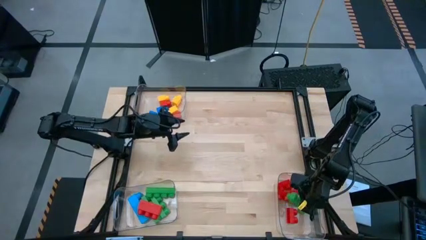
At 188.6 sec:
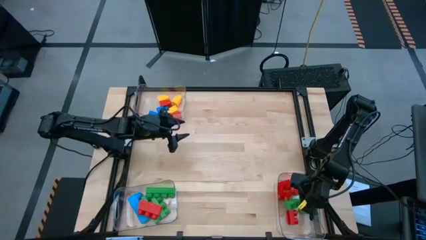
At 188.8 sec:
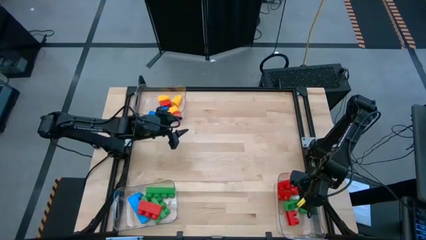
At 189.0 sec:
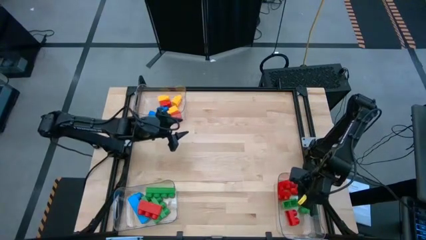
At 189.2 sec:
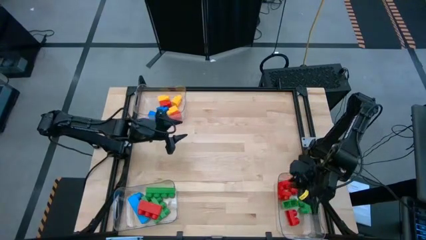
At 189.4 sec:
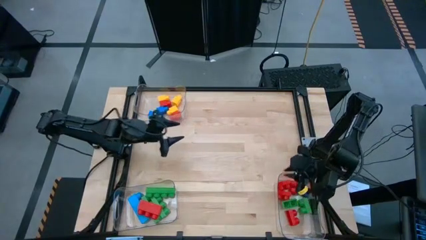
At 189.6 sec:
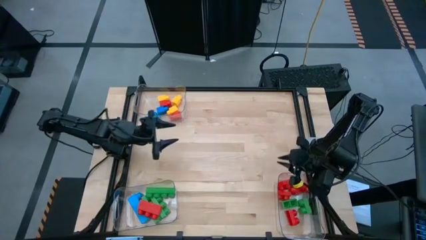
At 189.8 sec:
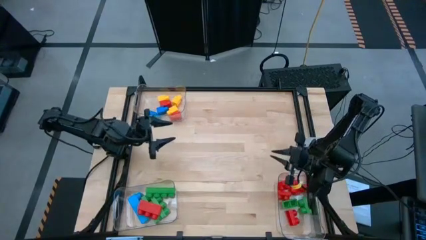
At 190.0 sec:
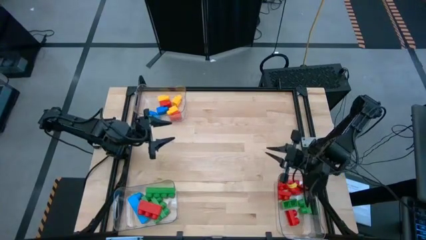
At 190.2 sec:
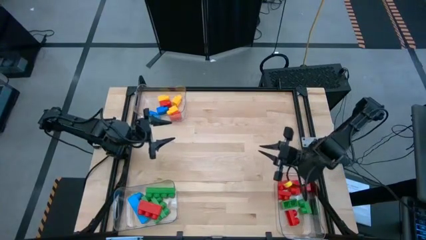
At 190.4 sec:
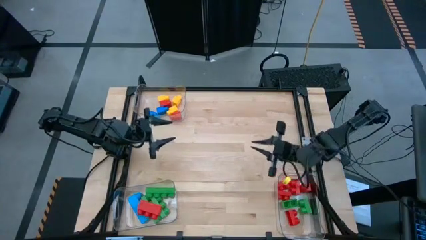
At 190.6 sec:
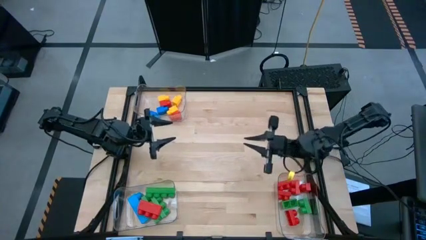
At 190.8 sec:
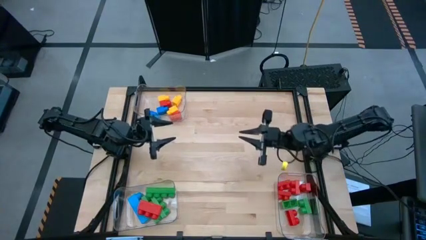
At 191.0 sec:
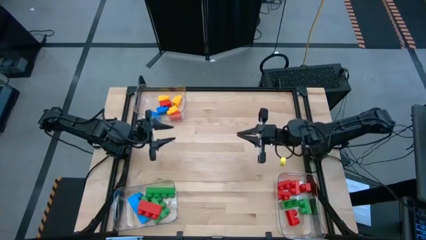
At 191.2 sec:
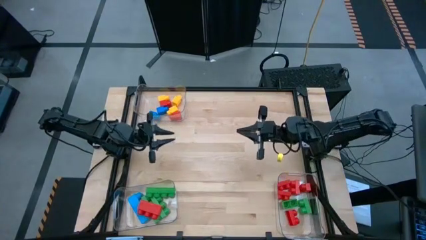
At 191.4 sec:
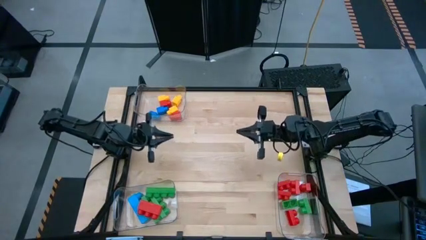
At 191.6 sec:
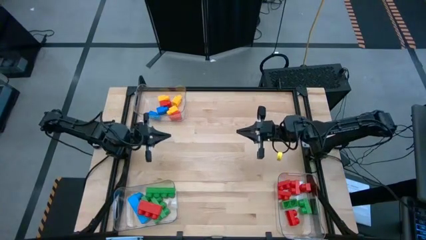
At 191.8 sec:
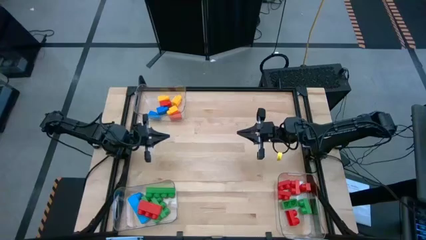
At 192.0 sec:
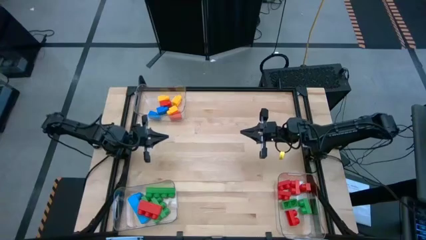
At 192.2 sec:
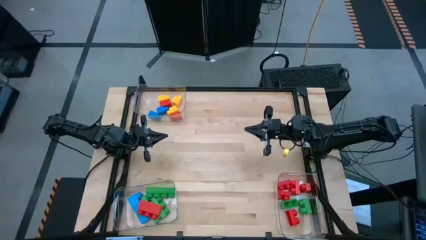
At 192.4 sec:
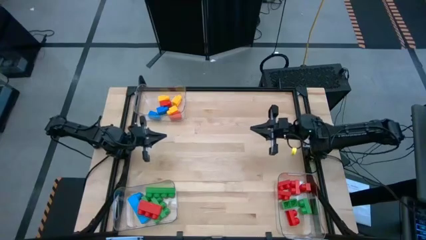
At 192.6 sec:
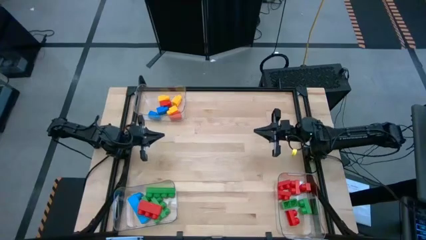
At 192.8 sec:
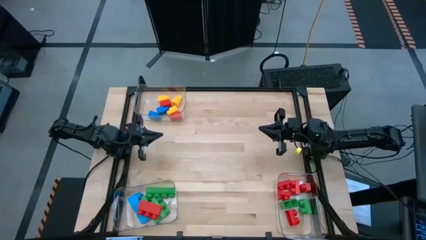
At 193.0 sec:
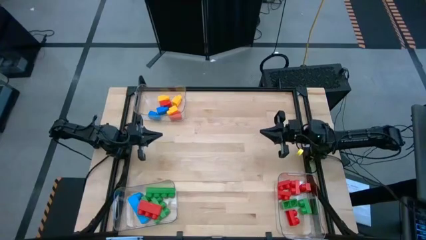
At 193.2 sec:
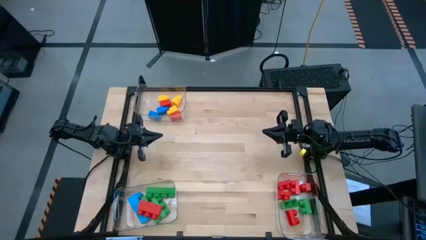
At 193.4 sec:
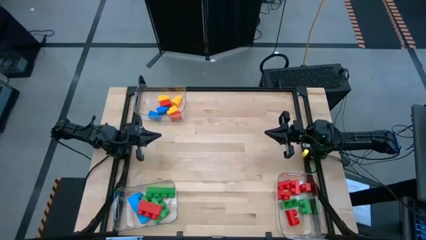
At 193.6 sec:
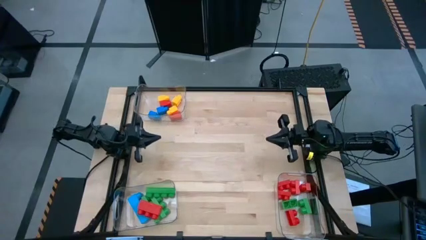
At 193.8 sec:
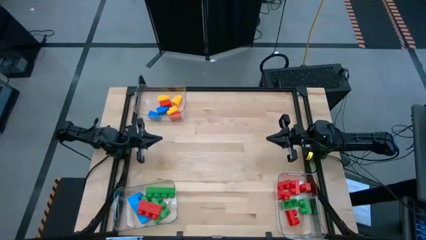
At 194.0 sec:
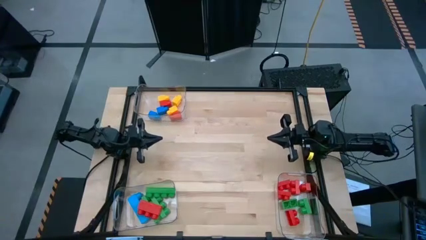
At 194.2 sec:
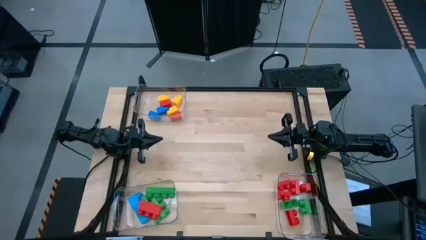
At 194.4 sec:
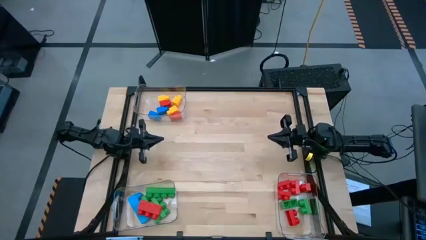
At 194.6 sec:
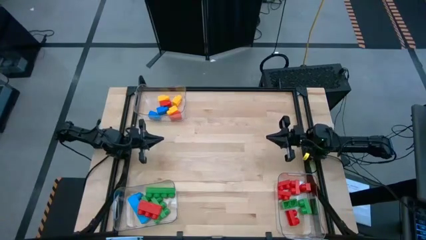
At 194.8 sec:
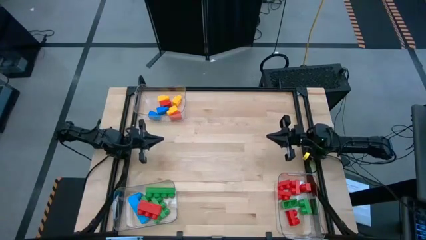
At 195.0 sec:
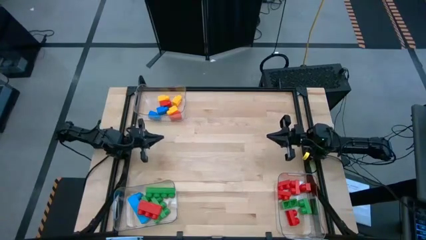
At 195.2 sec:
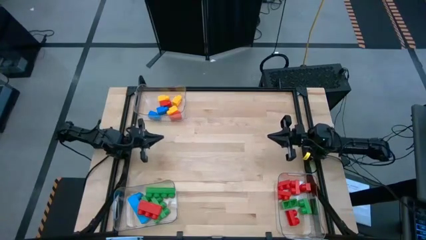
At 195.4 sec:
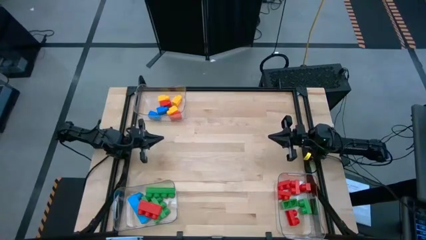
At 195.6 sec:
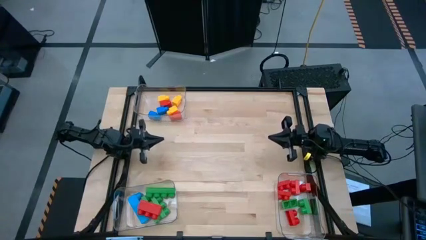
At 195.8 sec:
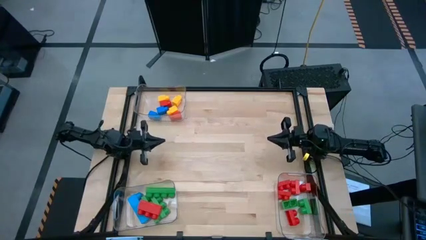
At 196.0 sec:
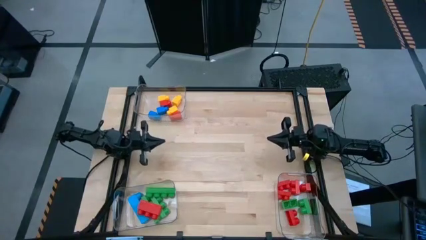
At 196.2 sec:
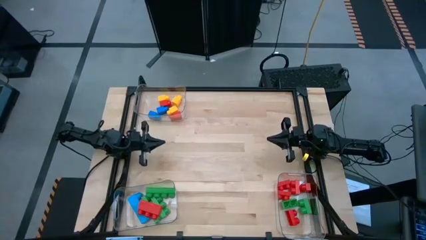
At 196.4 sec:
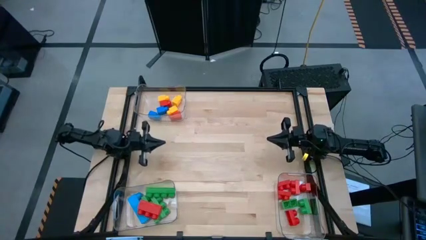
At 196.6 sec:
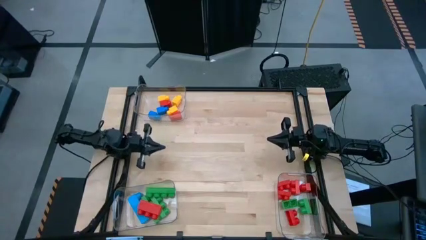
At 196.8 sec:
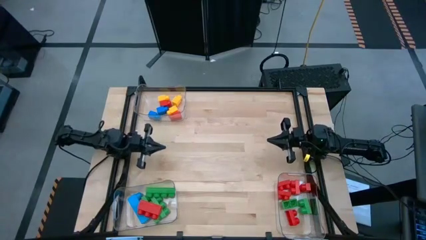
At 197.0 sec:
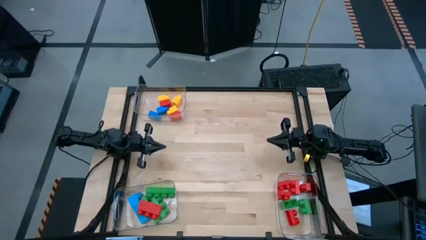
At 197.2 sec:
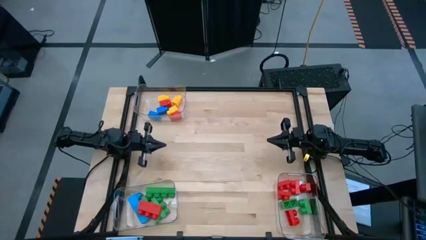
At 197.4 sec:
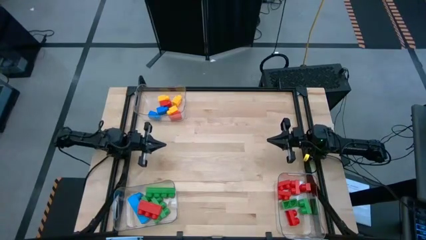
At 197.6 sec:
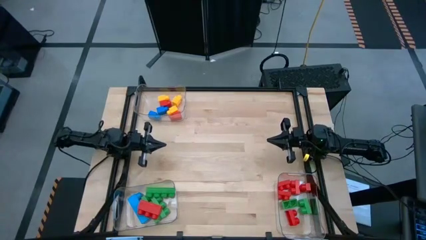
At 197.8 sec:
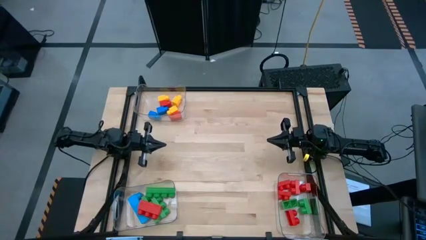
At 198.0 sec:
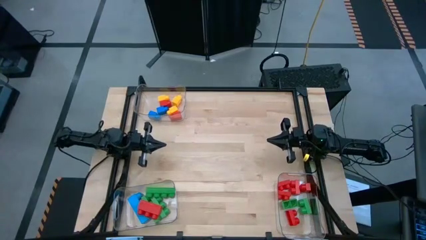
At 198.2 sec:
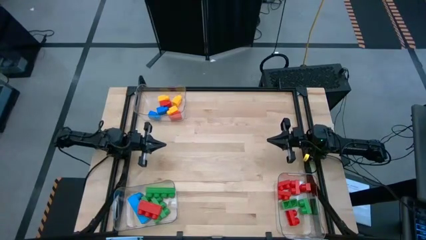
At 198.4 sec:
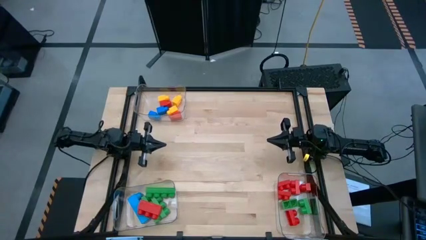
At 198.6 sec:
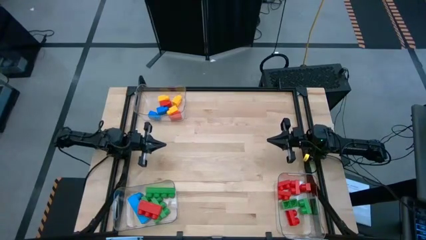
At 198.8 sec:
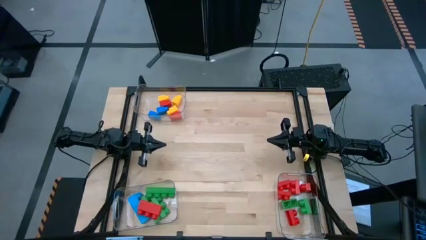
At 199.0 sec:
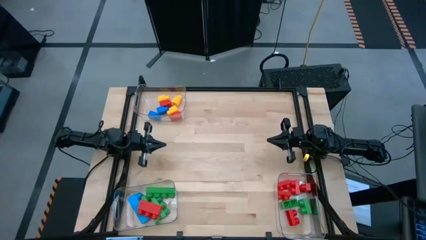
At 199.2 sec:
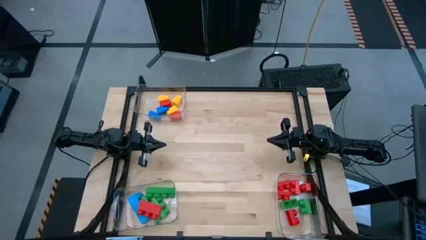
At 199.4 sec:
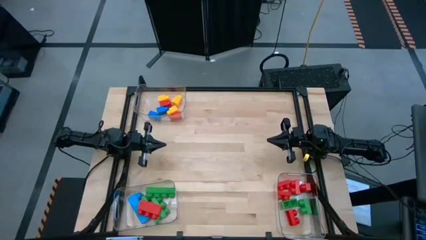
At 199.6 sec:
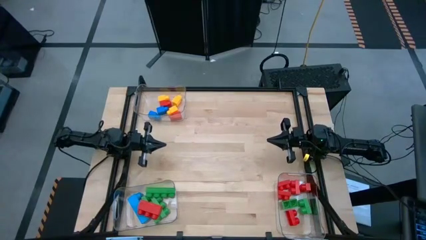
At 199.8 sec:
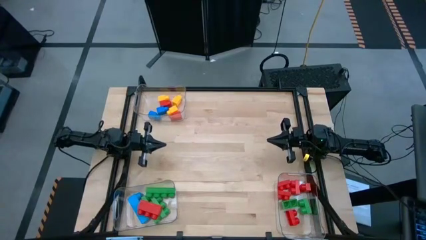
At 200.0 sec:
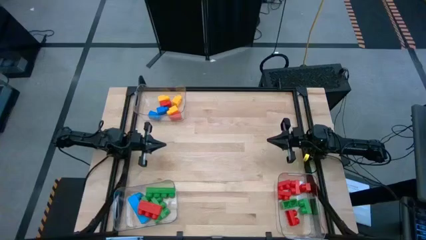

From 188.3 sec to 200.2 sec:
Task: Sort blocks by size
Return to Home Position

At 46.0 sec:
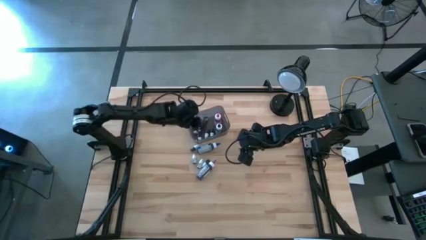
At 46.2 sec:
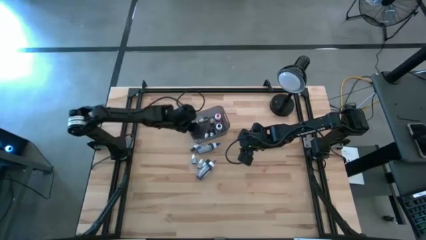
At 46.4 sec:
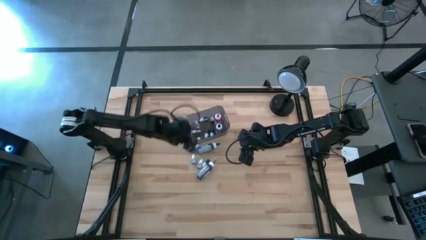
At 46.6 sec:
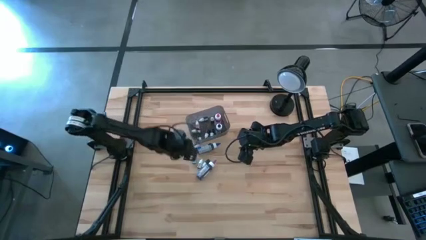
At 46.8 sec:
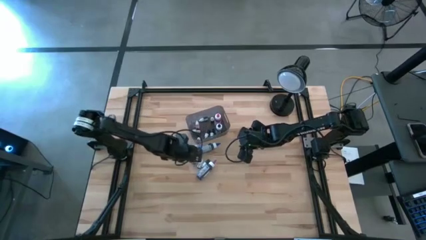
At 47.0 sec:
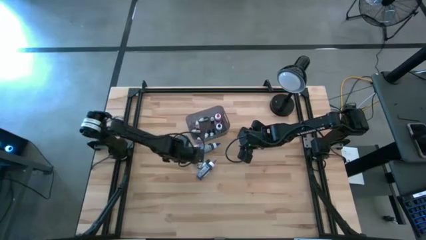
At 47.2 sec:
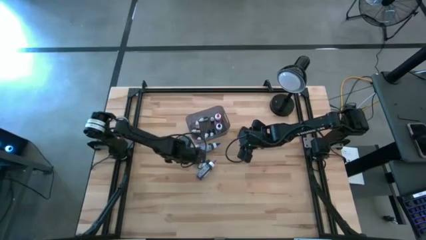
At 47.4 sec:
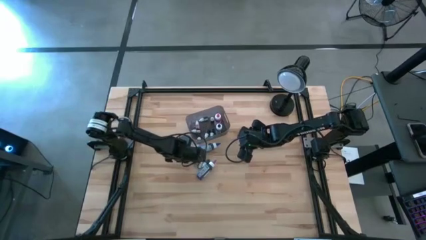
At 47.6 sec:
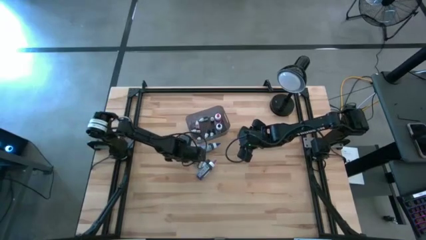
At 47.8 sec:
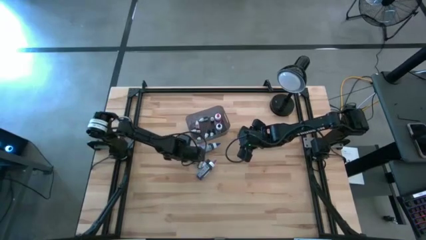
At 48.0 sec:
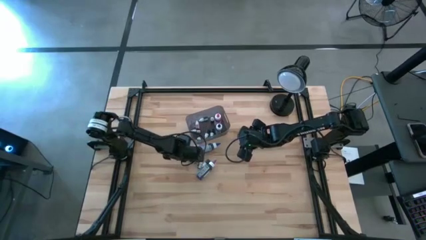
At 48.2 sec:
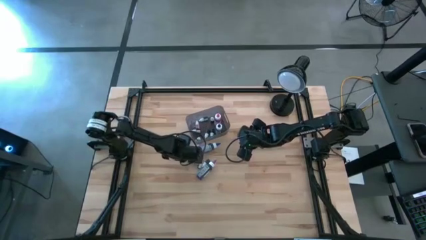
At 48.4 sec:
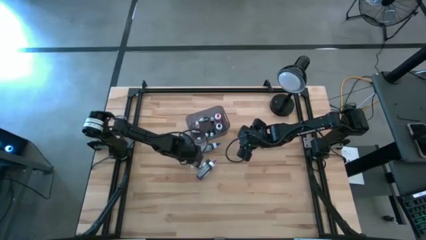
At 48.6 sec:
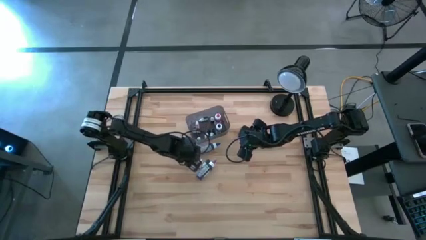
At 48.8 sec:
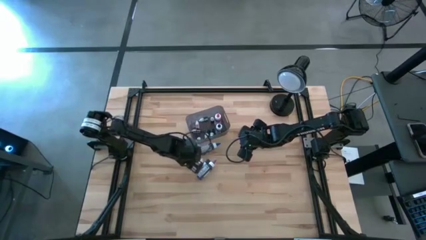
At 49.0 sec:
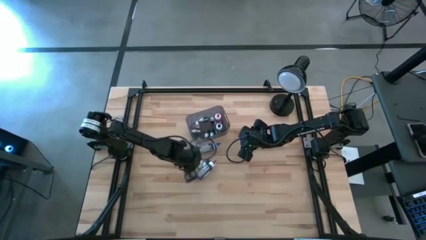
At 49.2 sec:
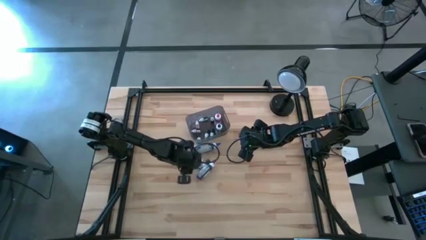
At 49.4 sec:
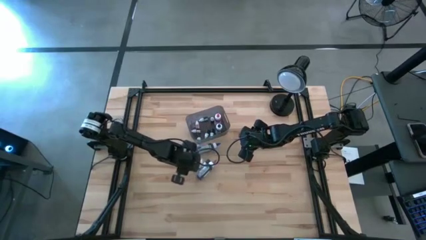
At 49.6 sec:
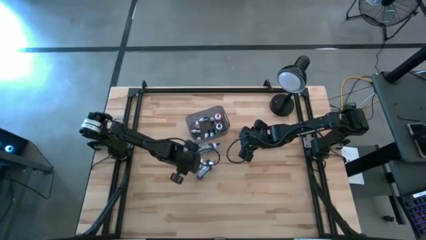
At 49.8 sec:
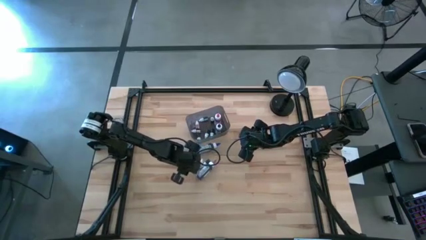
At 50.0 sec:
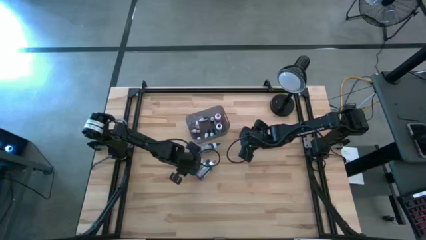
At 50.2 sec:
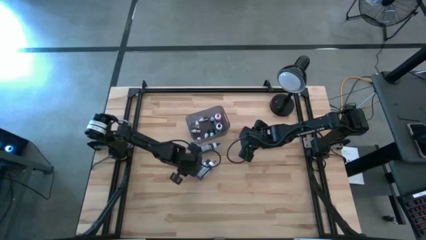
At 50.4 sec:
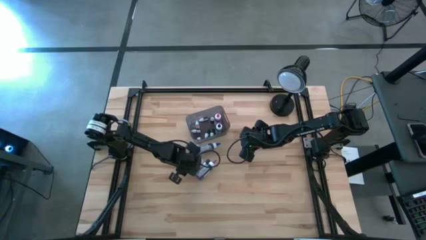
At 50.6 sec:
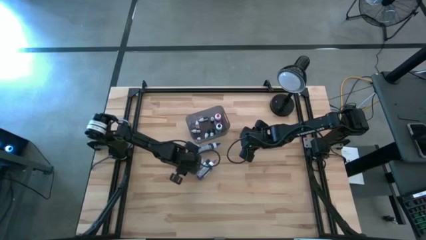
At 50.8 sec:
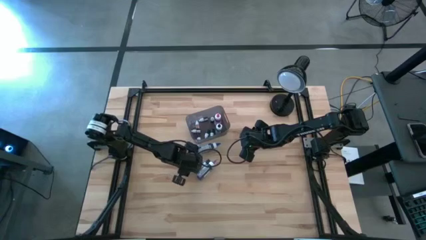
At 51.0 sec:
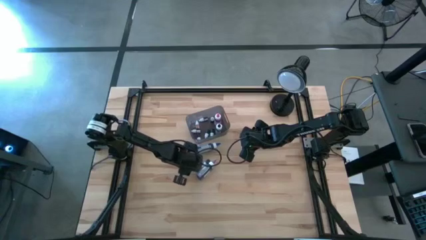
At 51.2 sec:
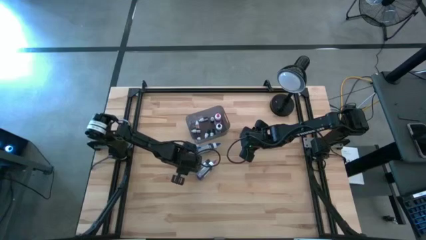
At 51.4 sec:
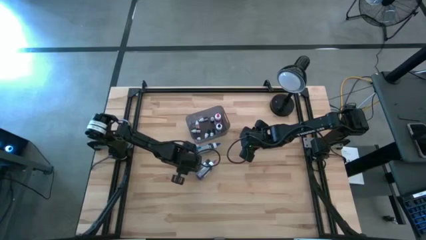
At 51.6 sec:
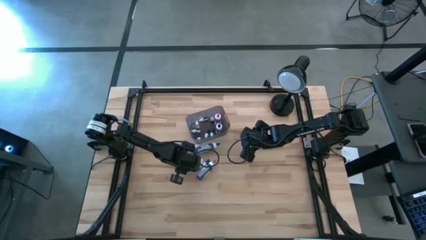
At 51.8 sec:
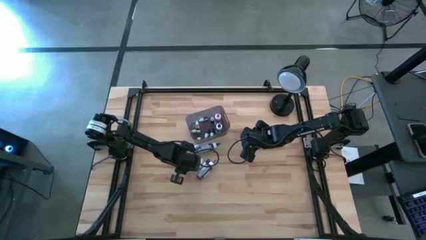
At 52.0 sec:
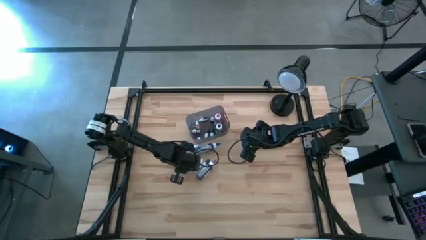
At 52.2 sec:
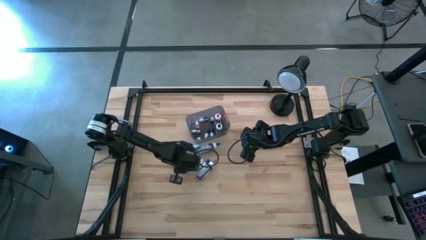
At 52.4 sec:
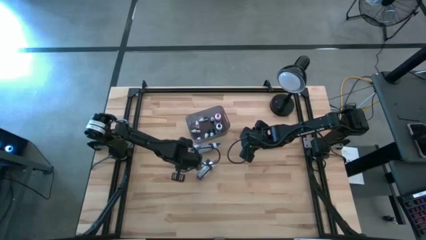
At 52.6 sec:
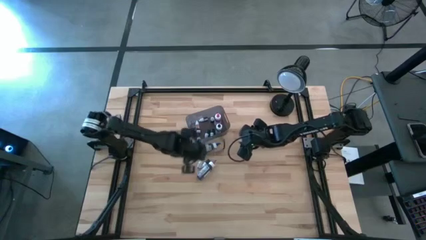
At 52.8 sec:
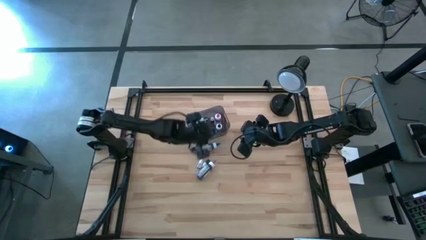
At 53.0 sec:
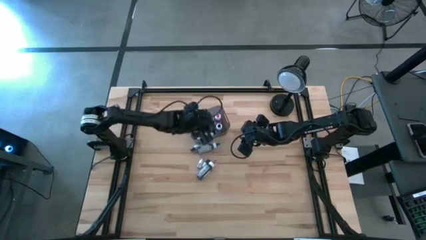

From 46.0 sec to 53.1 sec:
Task: Pick & Place food coloring
Put the small light blue food coloring bottle into the gray bin
